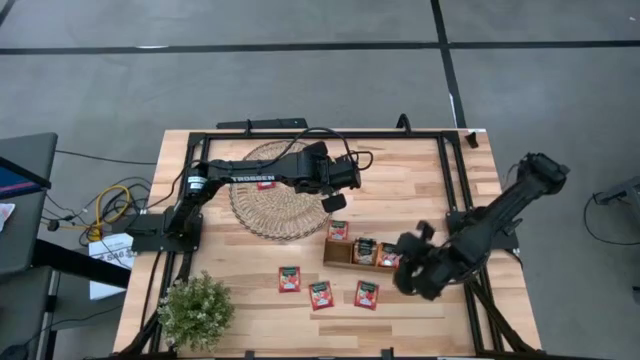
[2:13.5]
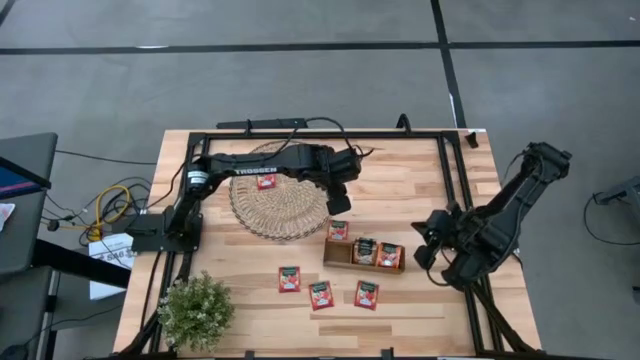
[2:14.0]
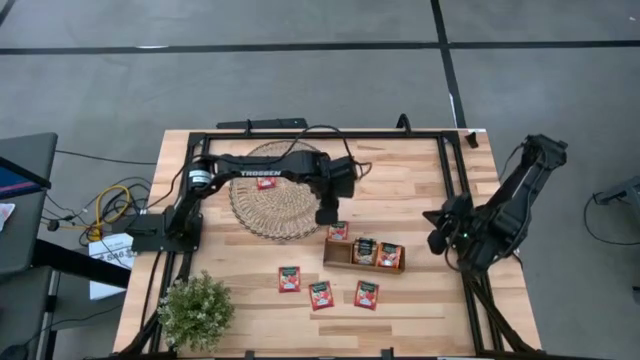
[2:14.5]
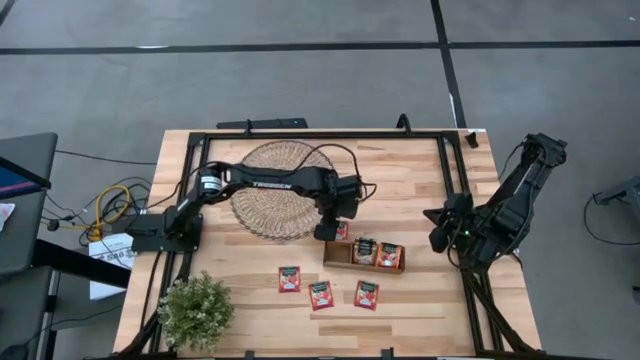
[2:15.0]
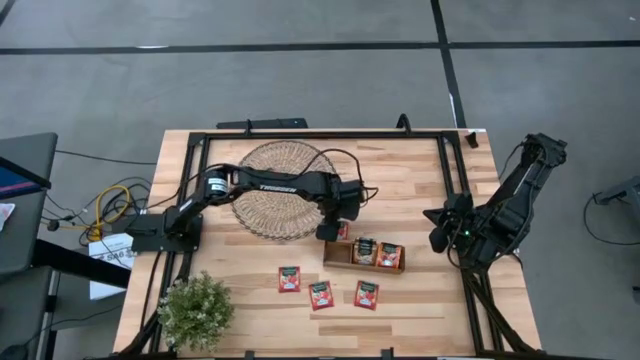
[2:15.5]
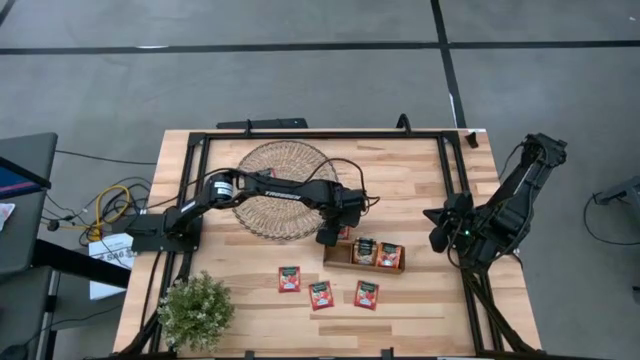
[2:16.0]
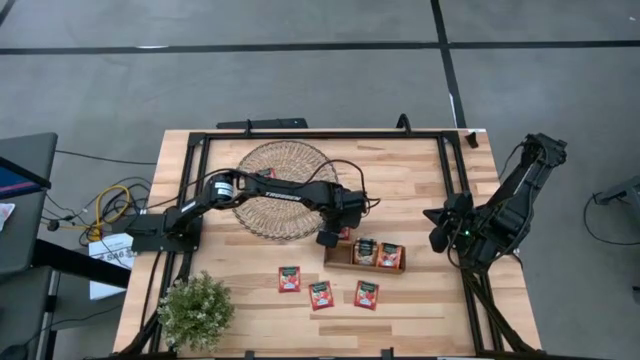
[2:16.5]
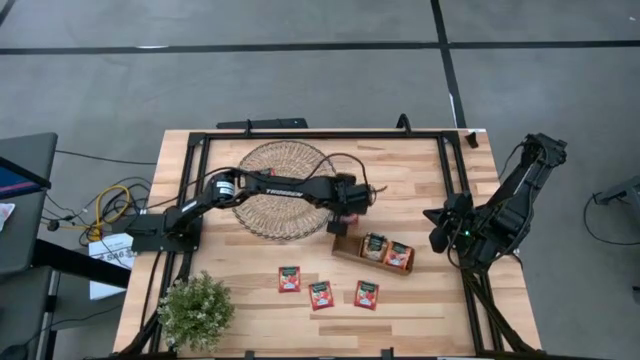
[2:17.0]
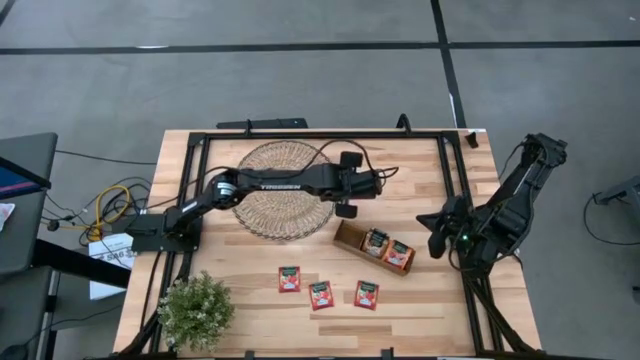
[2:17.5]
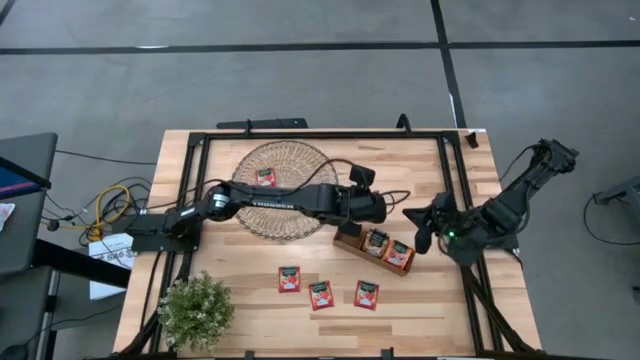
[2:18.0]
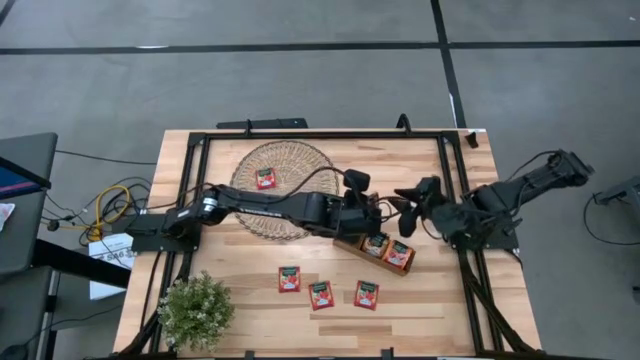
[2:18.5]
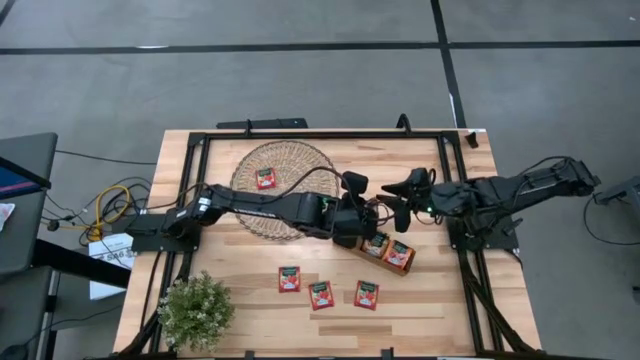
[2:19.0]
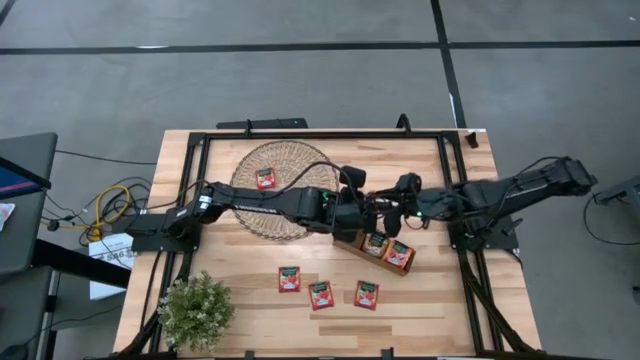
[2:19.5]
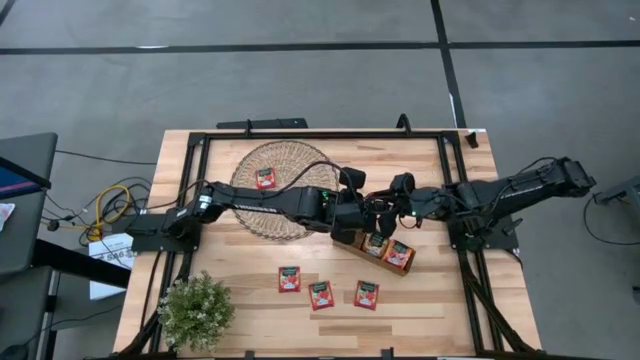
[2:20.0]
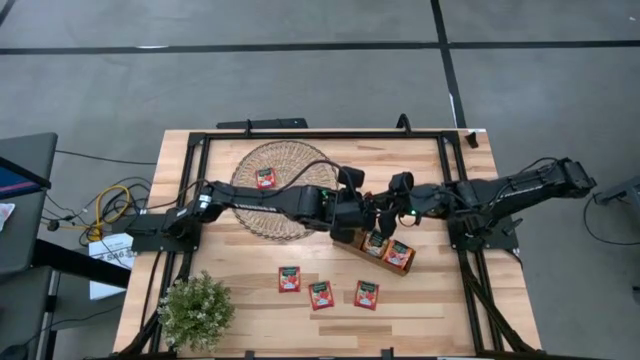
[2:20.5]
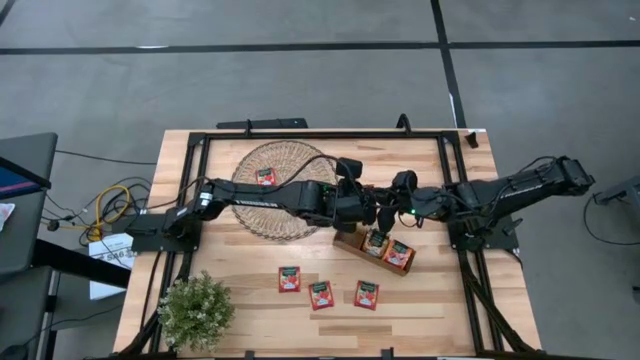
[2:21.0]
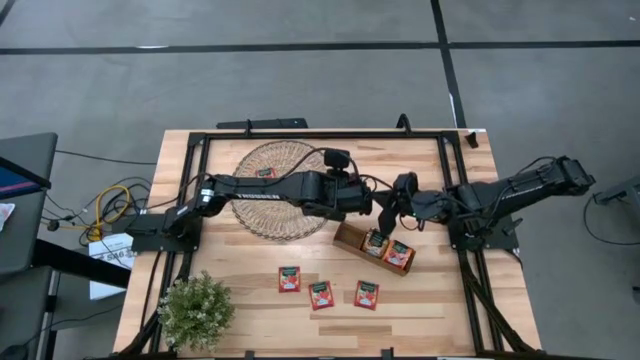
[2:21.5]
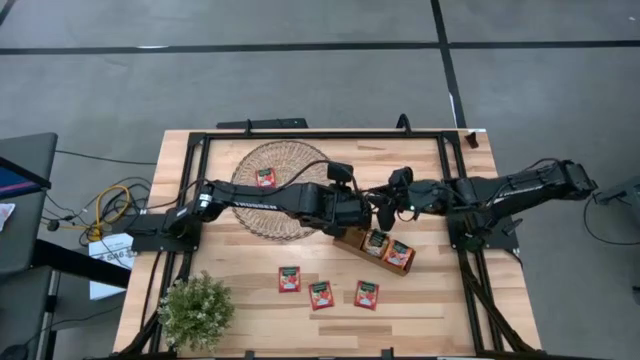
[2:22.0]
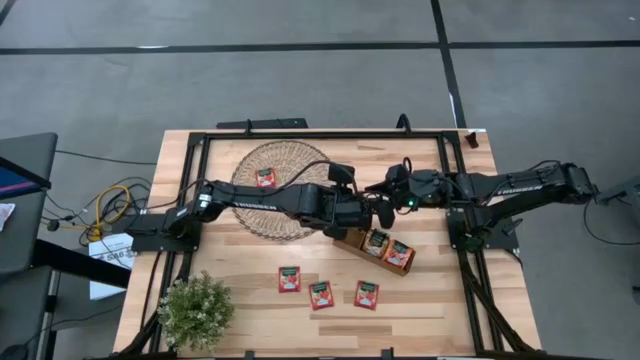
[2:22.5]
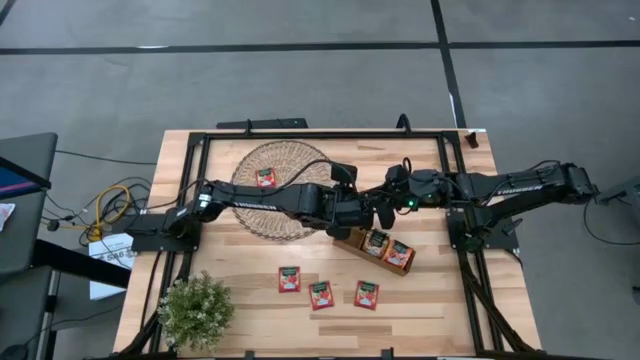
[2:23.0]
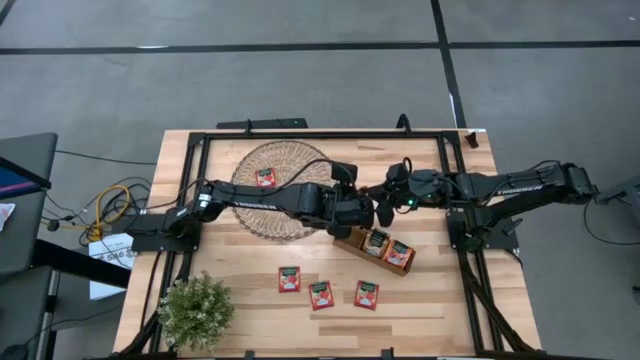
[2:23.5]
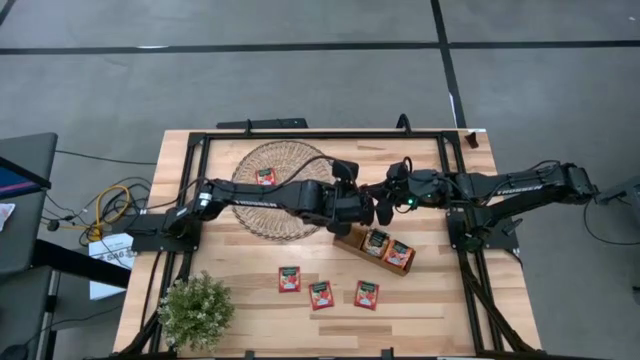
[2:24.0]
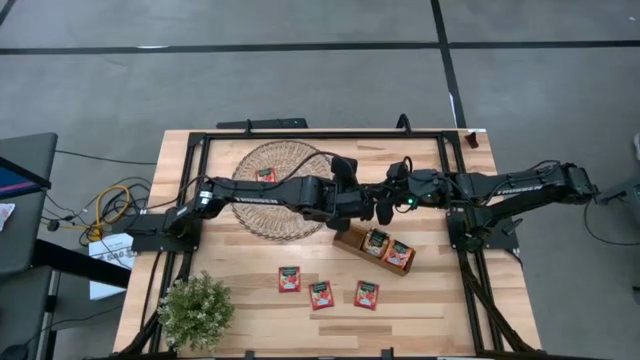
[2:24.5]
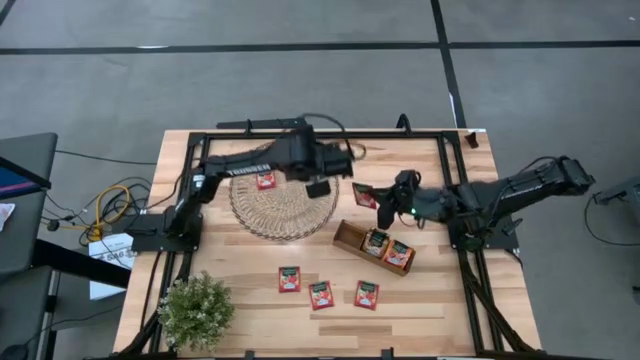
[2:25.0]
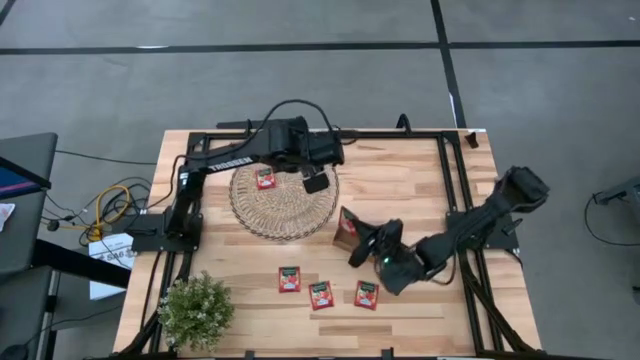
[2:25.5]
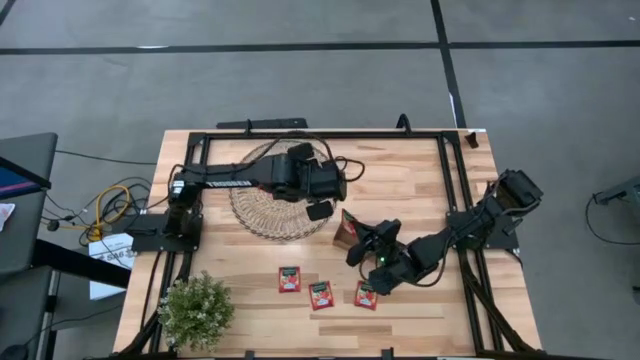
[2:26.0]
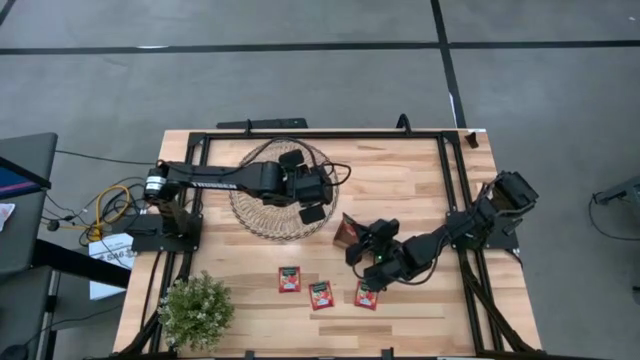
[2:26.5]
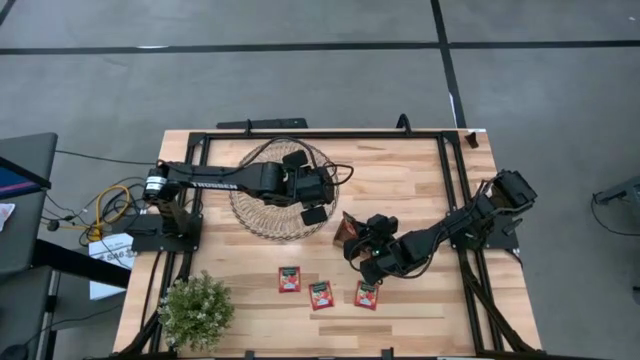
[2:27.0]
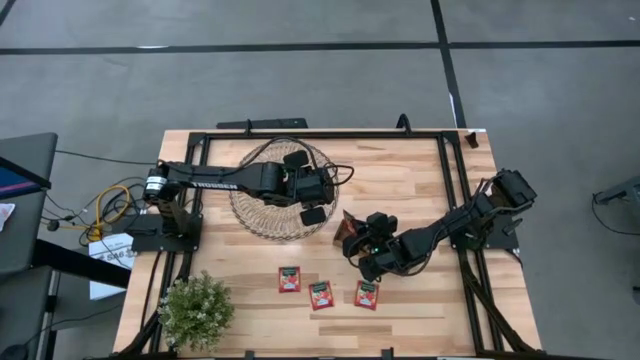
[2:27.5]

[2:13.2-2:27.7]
Task: Pick & Place Tea
Put the red tea bag into the left section of the wooden organizer

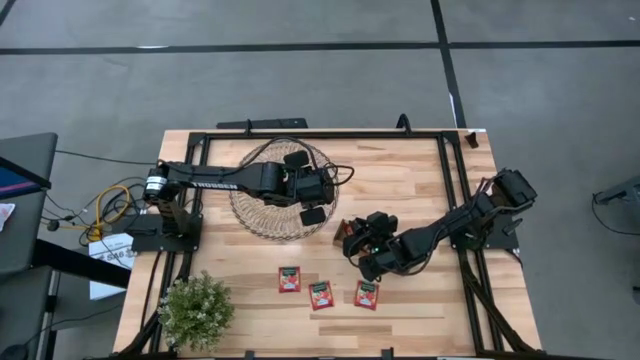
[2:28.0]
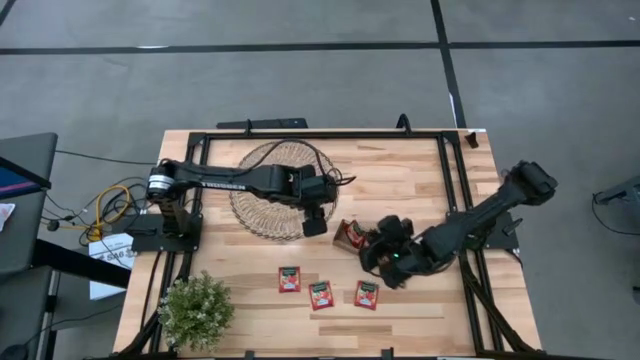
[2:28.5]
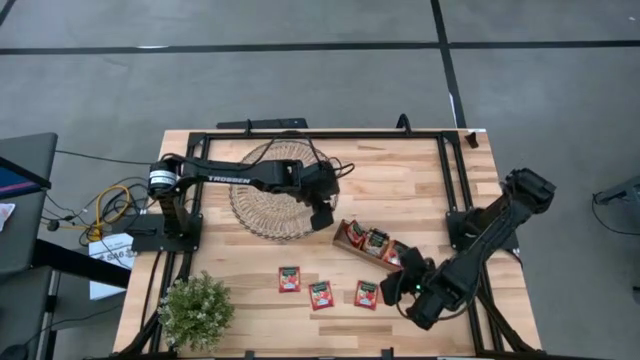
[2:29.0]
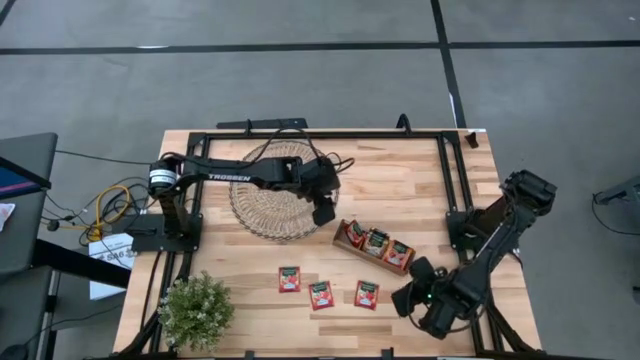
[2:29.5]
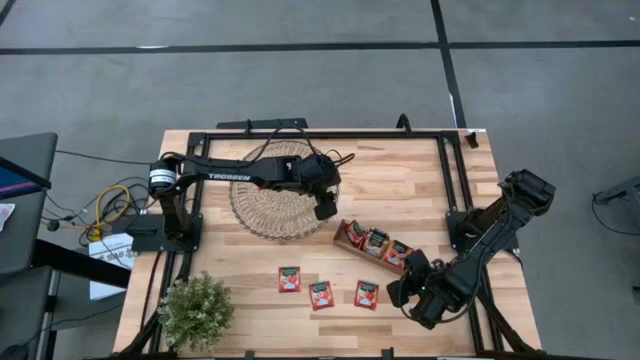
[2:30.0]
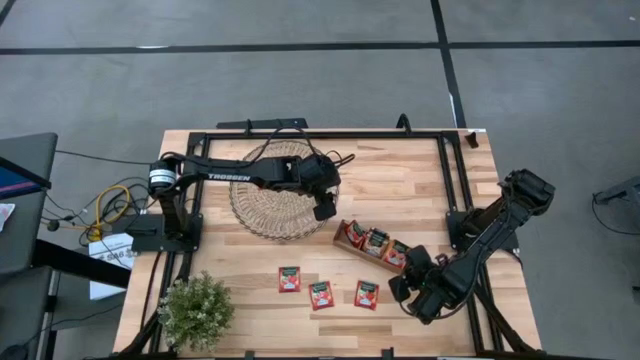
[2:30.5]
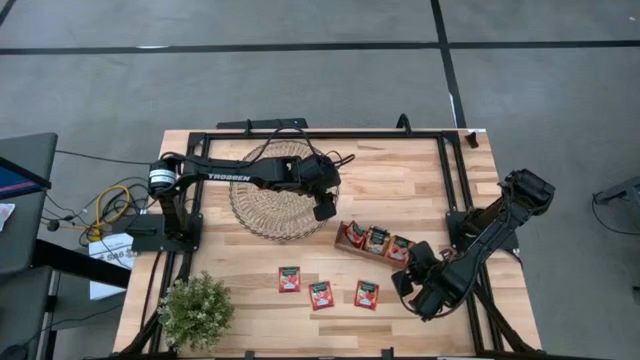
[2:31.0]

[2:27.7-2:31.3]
Adjust the wooden organizer

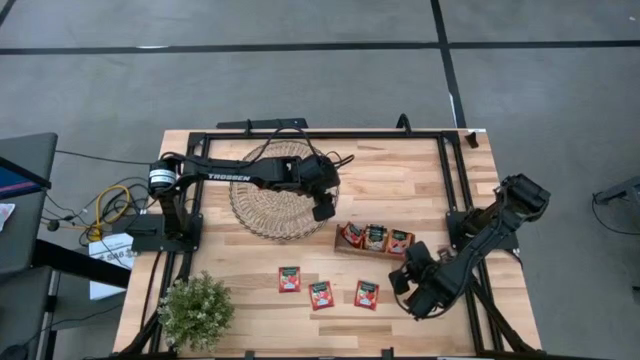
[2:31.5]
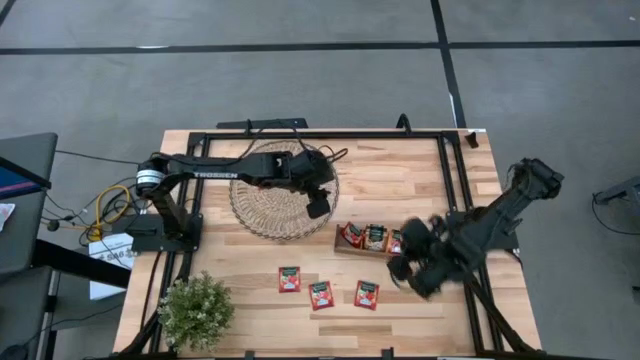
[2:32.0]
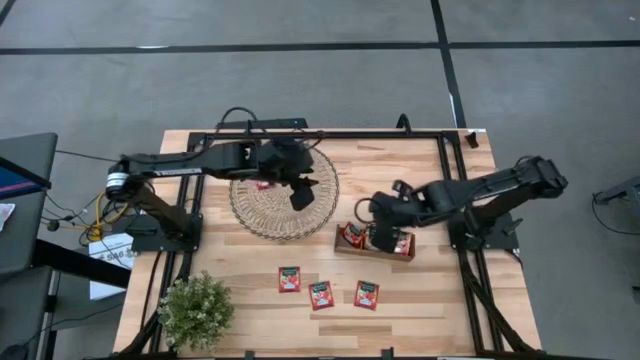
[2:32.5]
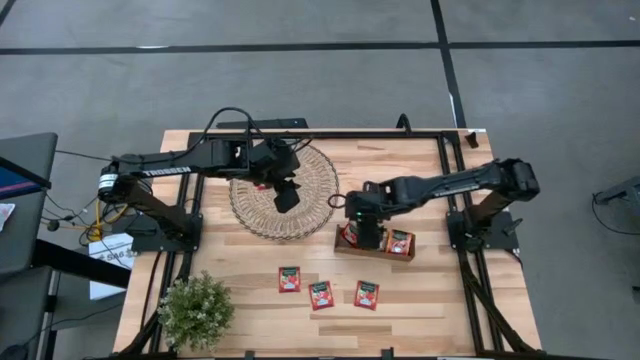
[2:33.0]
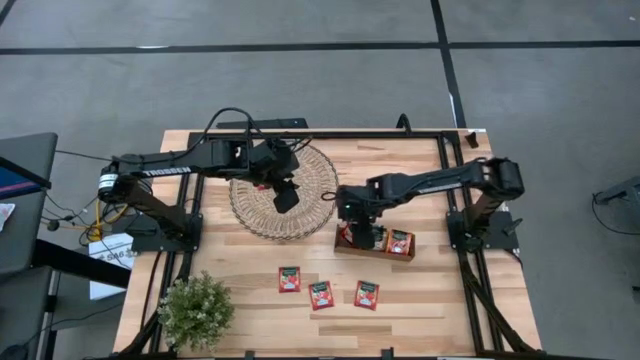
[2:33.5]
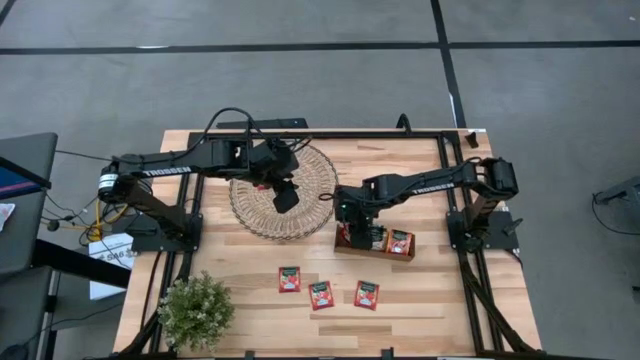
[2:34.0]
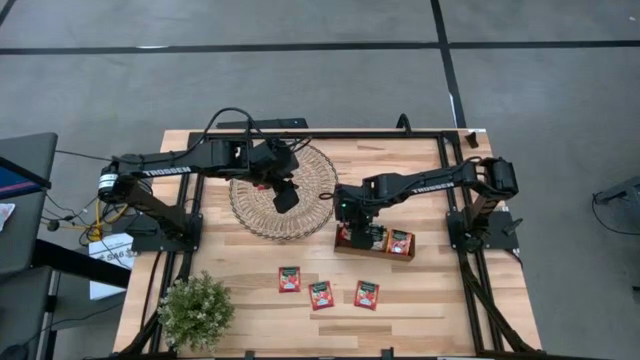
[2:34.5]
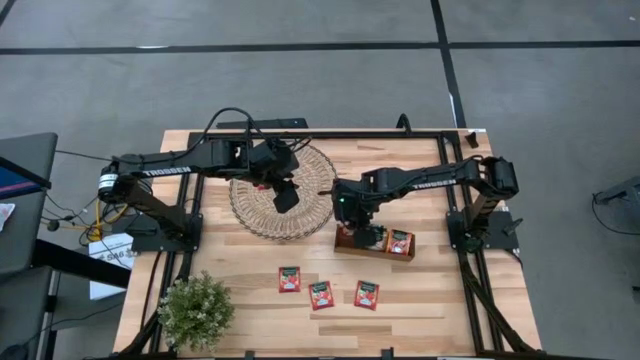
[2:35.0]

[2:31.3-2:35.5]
Adjust the red tea bag in the wooden organizer
